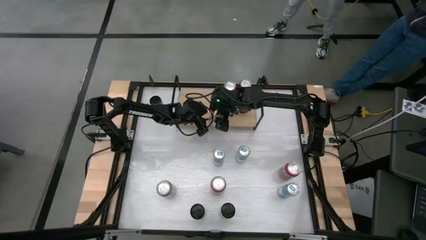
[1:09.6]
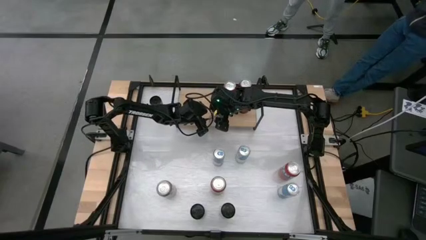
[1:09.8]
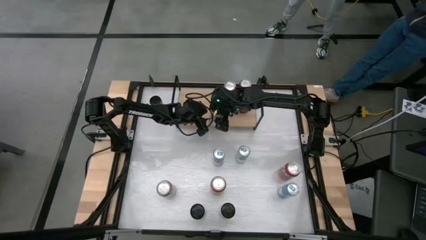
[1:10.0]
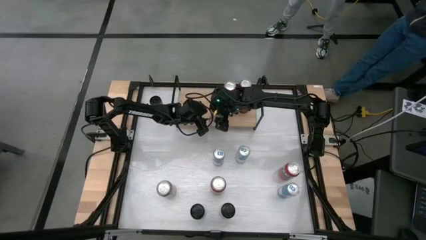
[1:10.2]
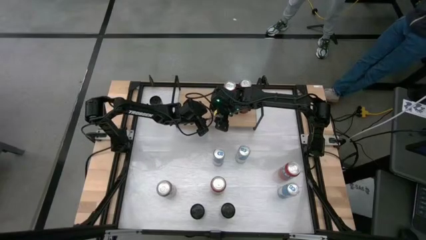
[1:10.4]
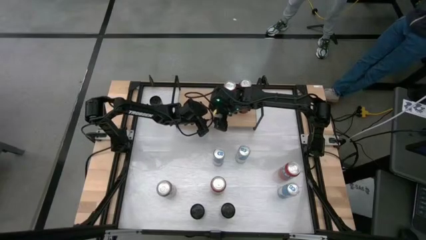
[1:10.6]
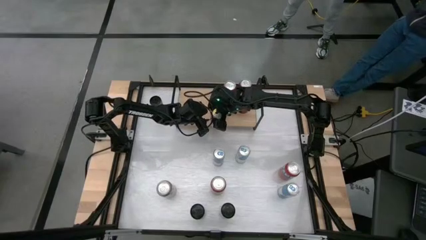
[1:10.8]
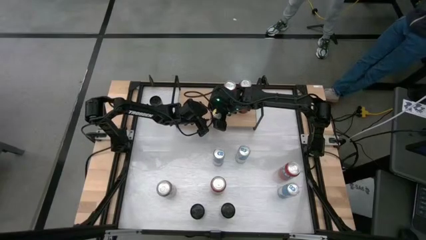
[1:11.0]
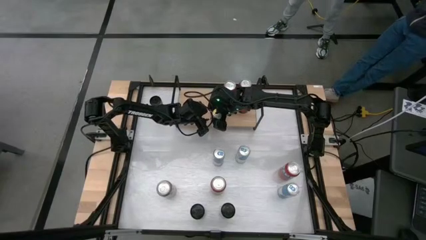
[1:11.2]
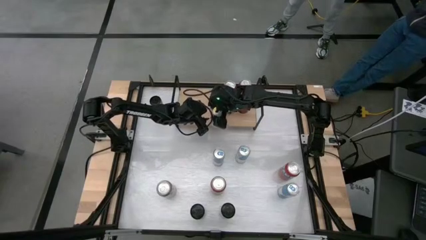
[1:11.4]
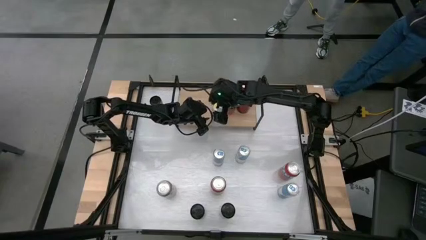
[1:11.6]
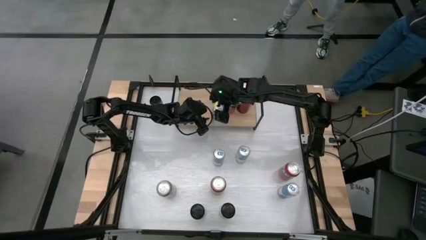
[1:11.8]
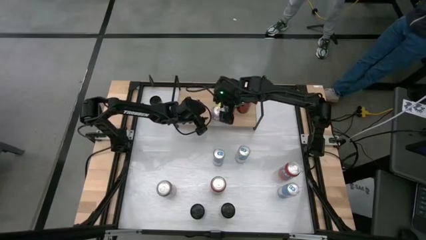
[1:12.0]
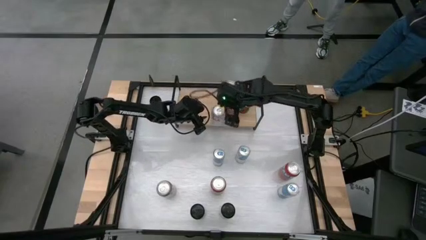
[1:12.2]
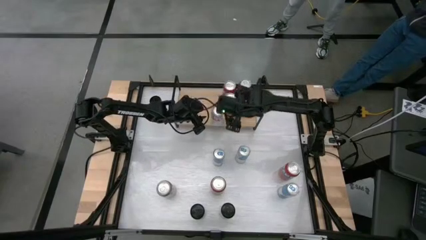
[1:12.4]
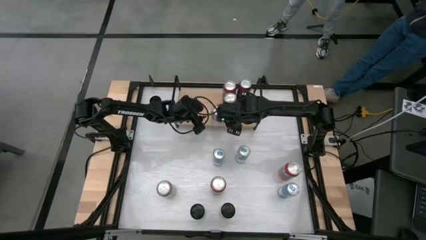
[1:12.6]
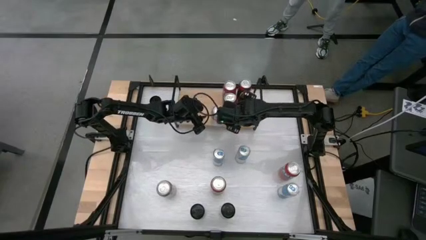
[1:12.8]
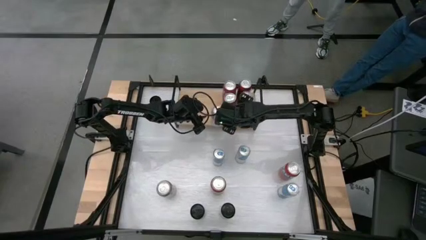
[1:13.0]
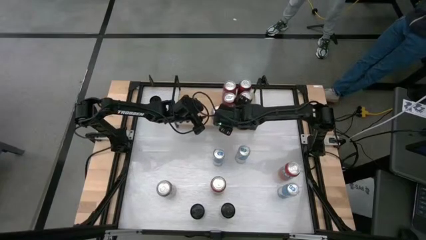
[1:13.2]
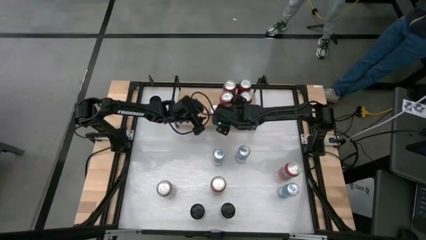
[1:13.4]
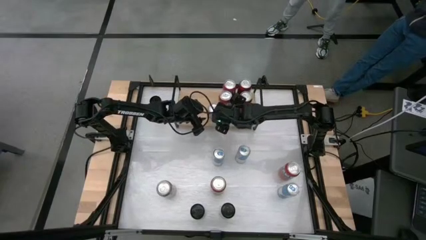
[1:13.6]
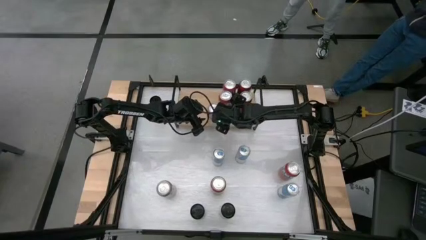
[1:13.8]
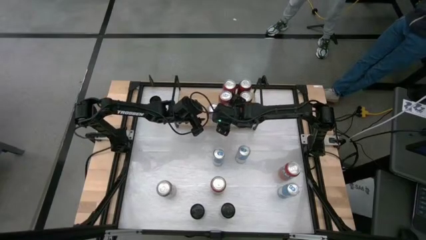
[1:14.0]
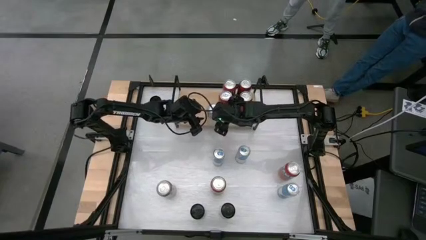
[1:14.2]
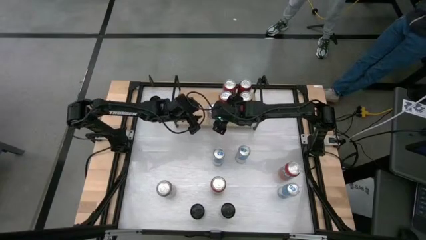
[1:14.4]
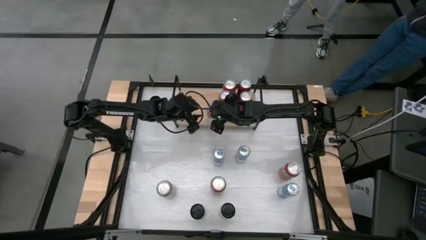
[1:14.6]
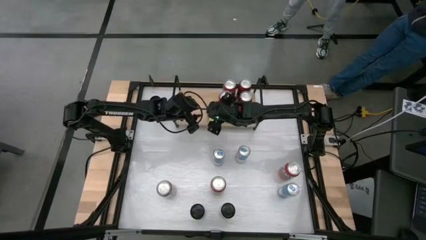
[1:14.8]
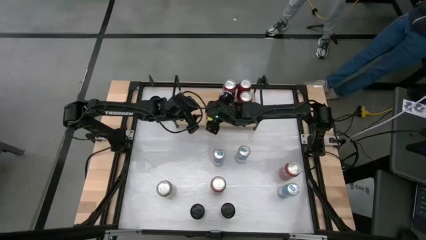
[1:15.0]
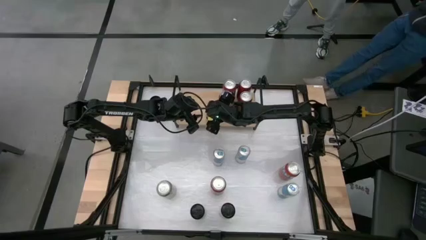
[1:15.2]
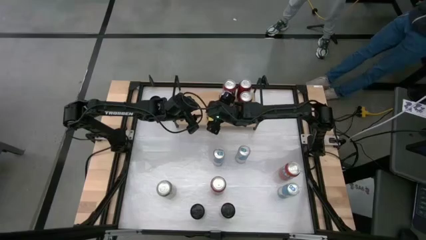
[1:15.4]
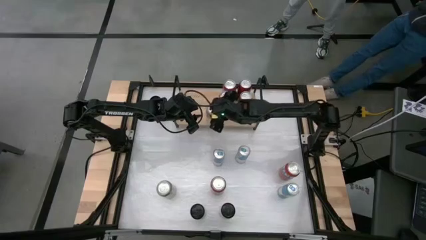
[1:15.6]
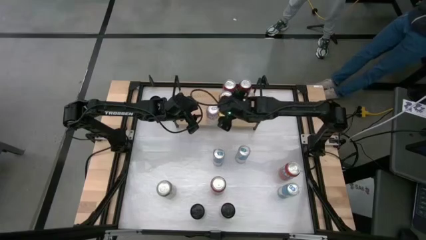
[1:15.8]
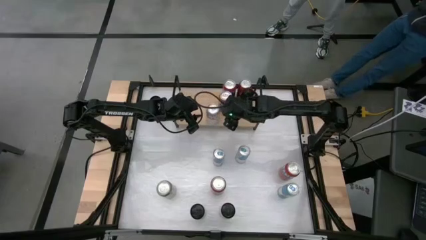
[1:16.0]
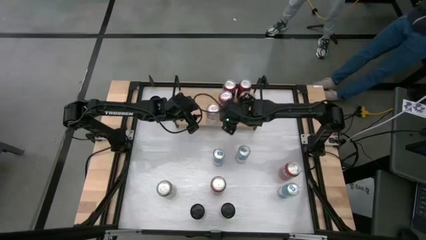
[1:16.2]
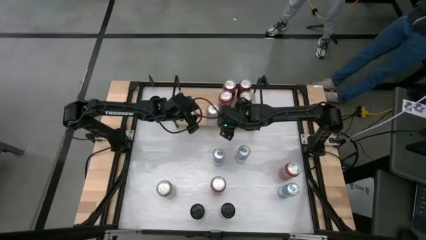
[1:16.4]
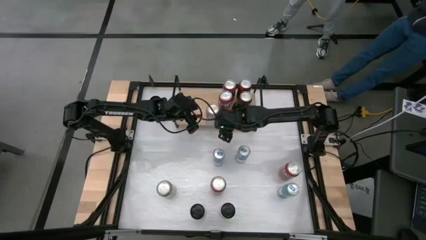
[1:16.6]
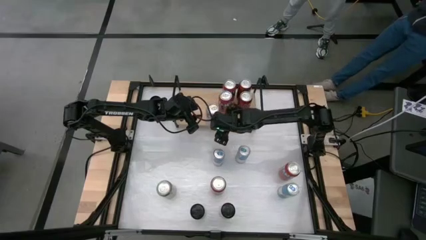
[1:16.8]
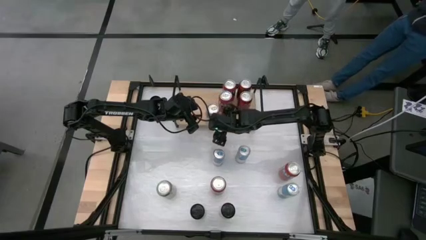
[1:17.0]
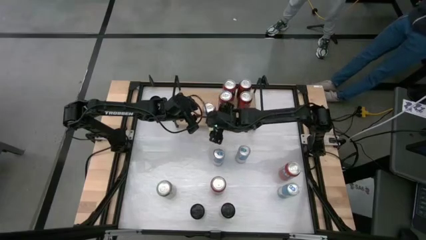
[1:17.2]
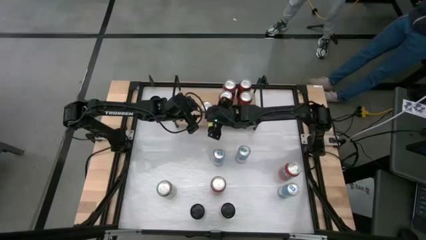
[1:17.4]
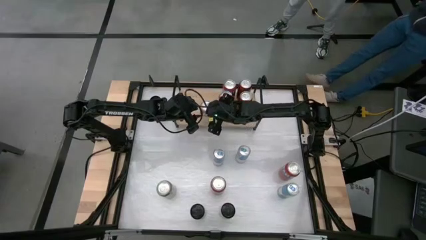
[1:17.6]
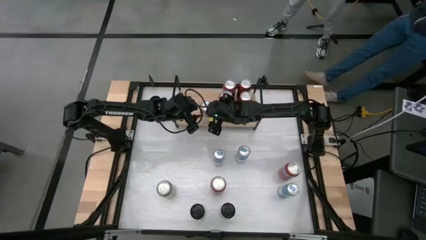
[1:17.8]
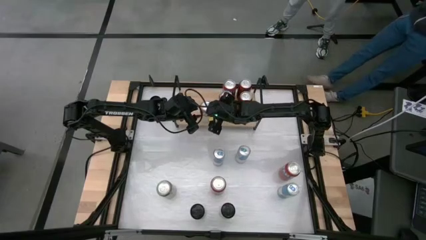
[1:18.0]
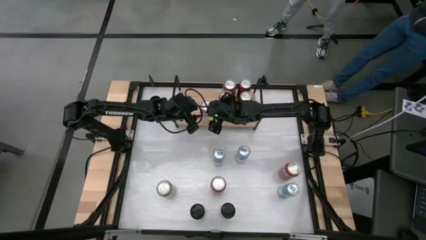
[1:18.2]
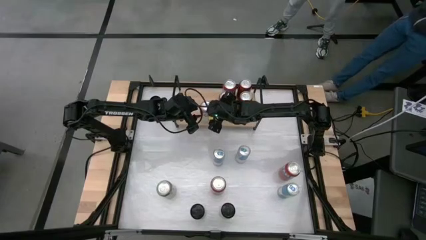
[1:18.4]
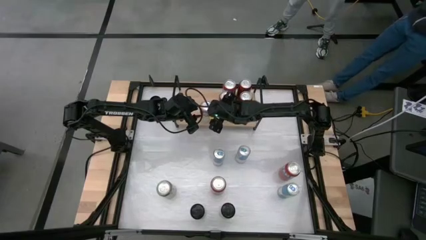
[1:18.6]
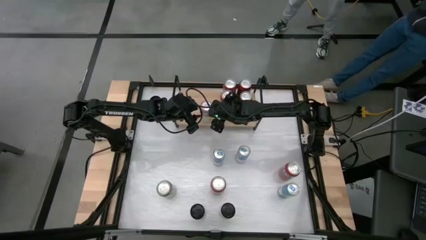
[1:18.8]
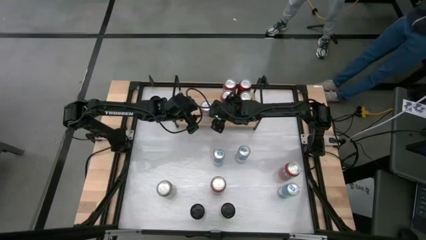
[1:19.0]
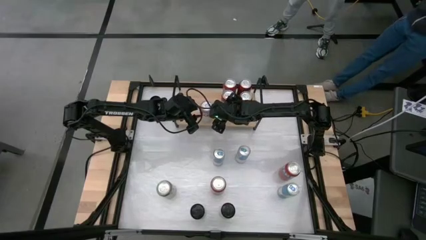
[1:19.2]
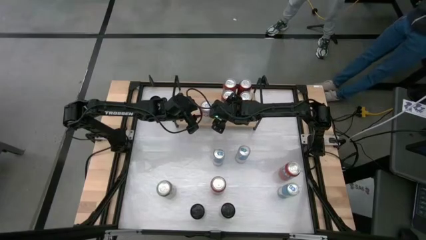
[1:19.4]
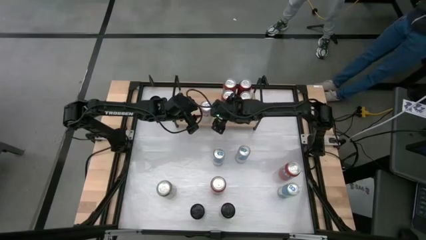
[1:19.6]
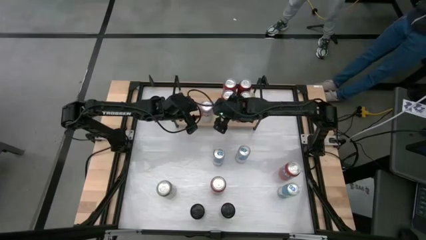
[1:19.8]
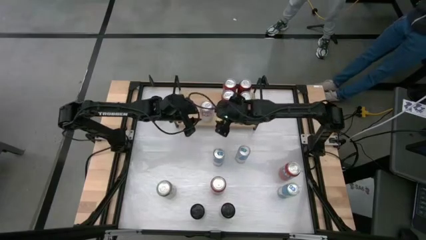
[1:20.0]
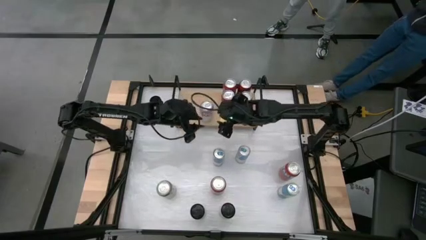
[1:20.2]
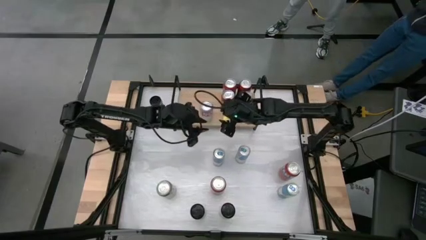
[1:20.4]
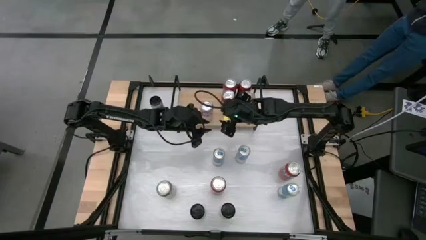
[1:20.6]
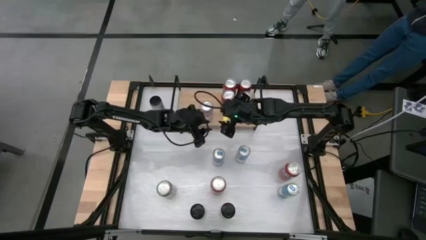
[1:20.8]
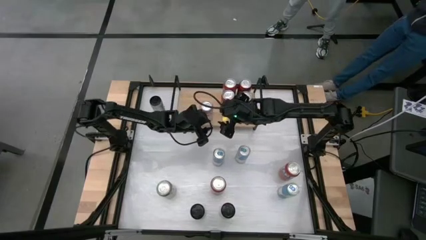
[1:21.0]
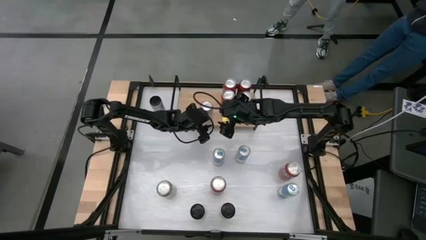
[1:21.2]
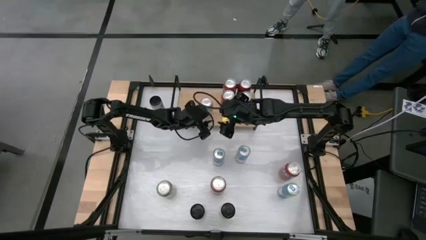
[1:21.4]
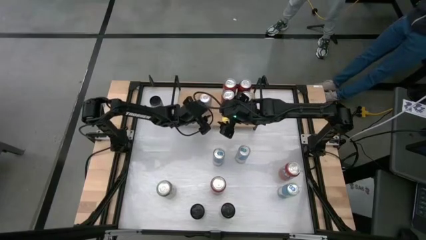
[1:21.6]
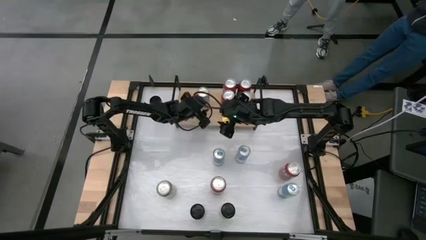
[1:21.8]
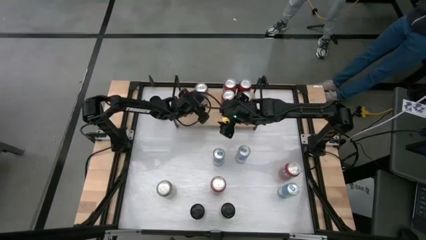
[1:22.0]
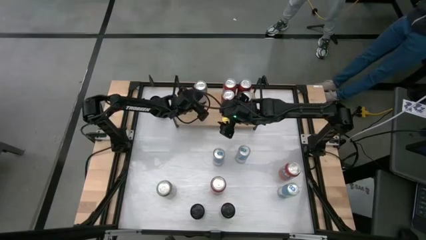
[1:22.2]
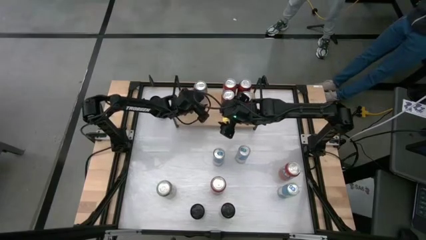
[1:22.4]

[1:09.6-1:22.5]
Task: Place canned beverage on shelf
Put the red and silver soda can on the shelf
